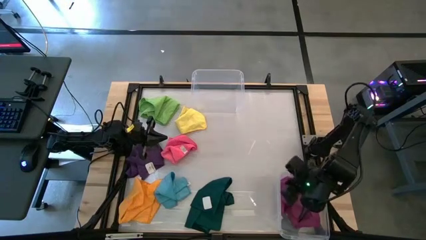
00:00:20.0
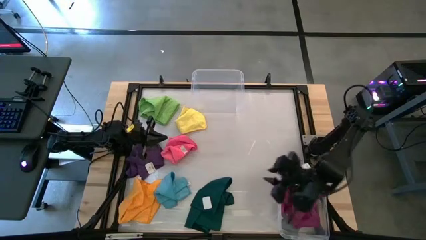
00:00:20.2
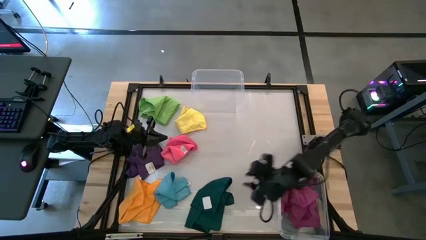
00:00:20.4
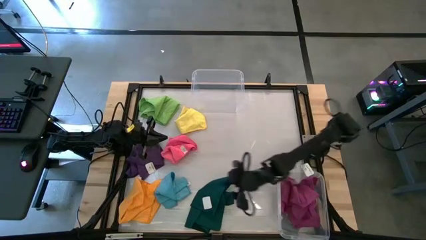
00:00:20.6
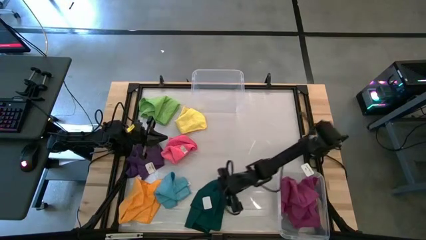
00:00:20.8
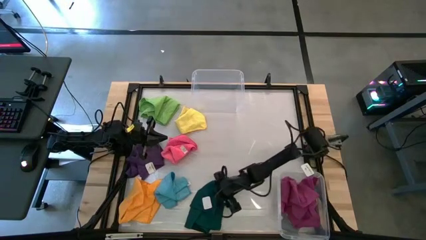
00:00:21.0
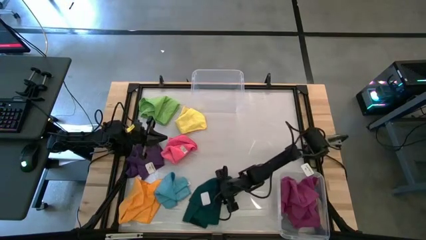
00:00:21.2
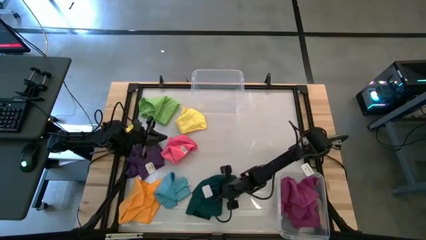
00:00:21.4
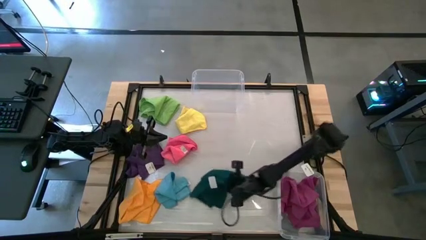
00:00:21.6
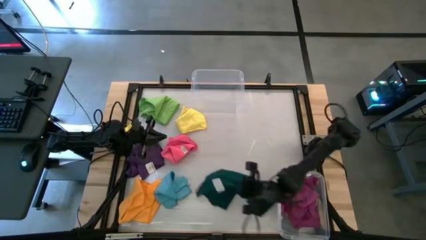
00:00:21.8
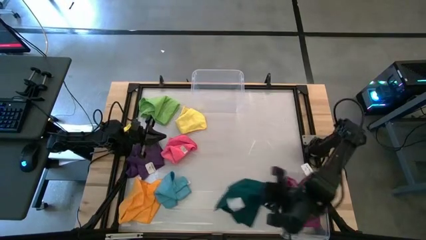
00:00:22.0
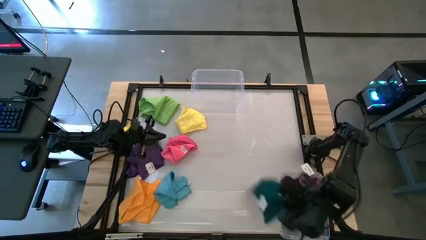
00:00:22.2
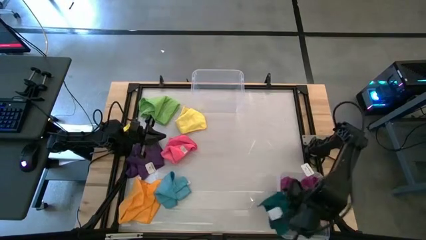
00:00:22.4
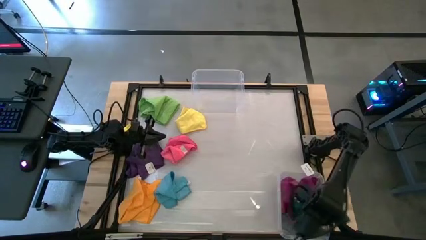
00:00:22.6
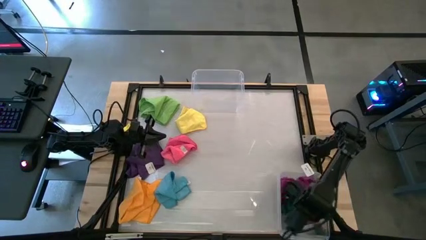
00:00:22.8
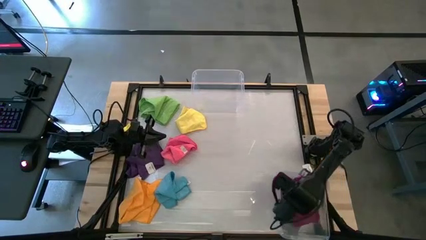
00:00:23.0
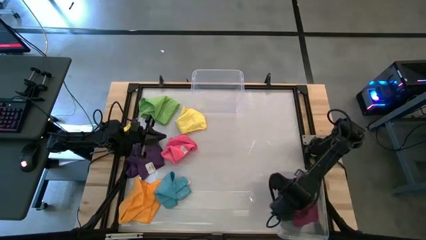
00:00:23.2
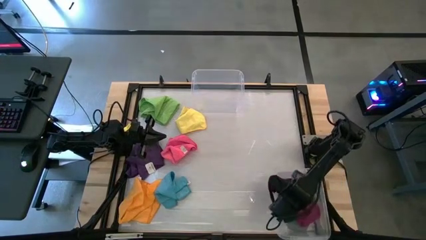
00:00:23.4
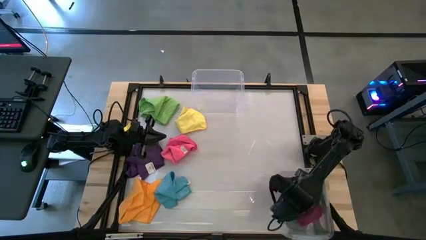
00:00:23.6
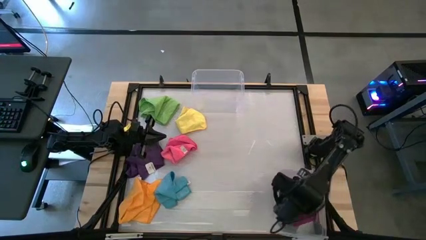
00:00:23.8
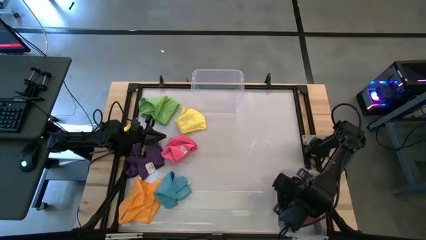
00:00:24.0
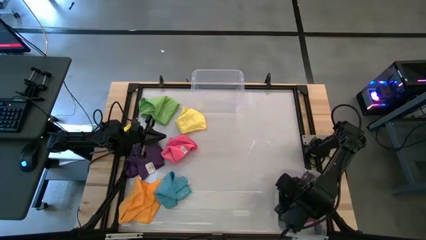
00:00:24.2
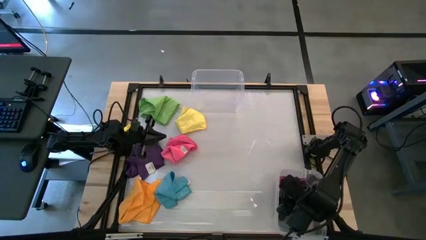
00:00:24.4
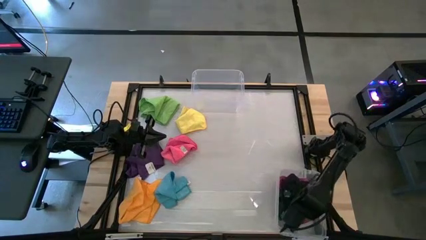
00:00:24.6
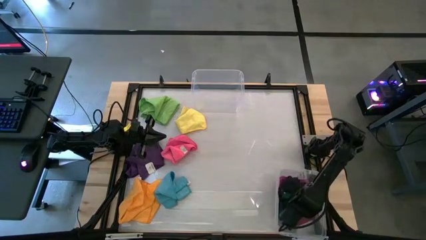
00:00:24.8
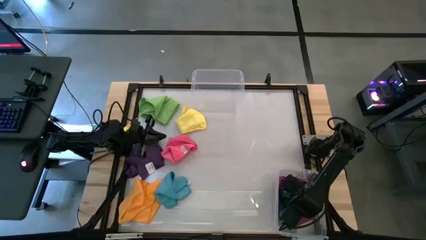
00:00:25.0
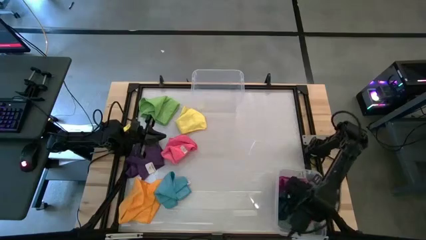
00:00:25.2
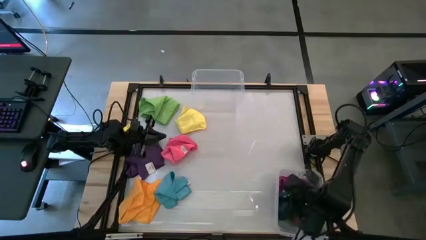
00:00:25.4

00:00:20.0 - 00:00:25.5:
Task: Sort towels by color in basket
Put the green microfiber cloth into the bottom transparent bin

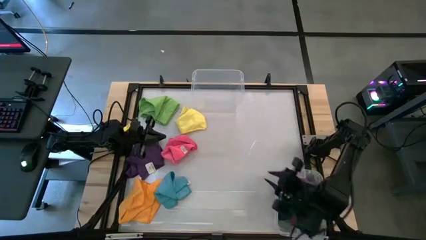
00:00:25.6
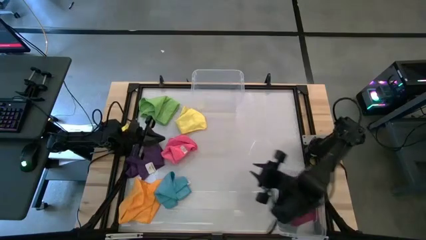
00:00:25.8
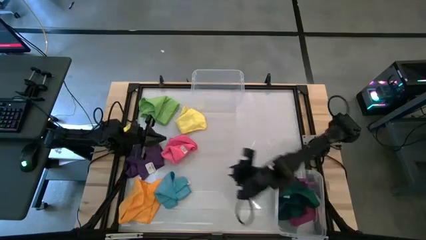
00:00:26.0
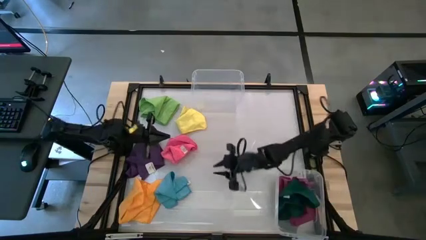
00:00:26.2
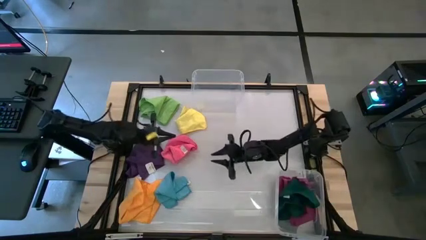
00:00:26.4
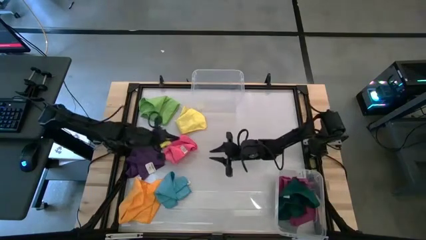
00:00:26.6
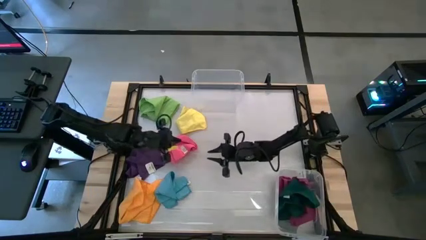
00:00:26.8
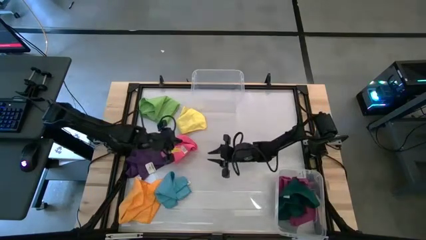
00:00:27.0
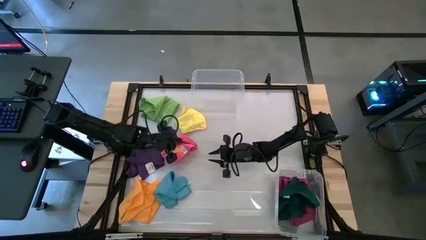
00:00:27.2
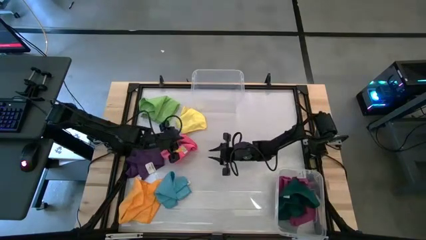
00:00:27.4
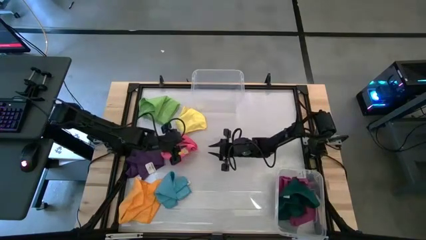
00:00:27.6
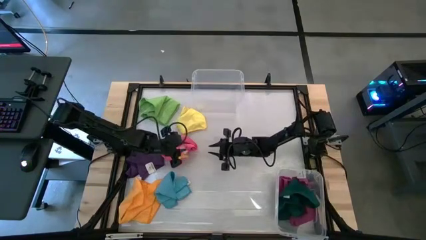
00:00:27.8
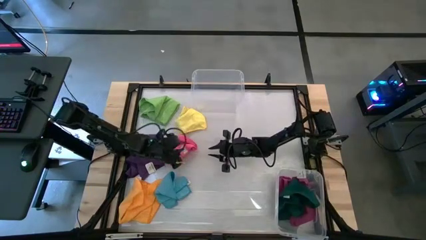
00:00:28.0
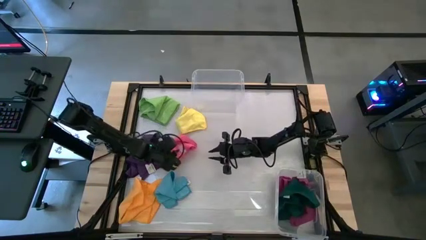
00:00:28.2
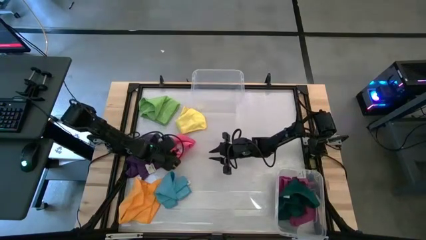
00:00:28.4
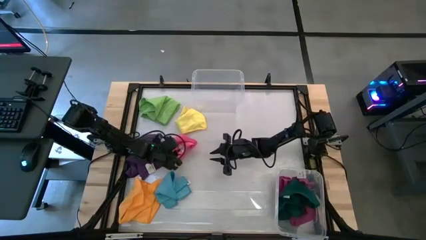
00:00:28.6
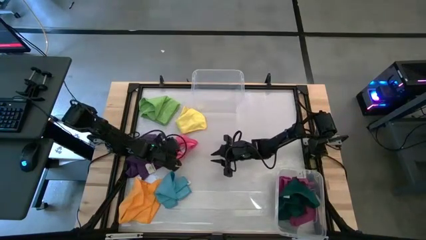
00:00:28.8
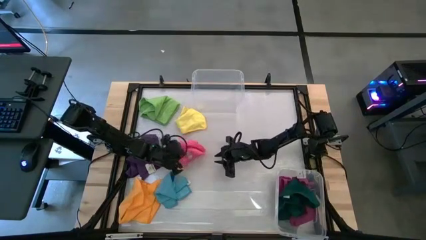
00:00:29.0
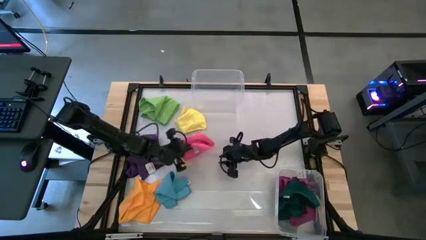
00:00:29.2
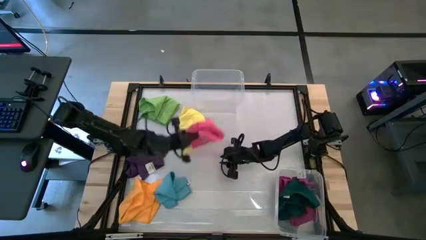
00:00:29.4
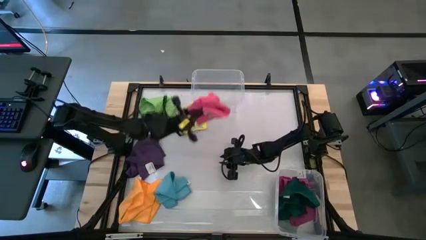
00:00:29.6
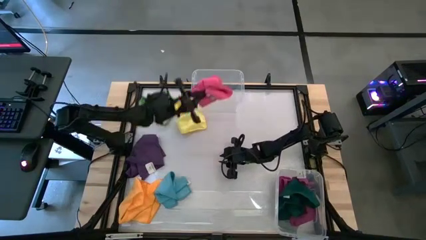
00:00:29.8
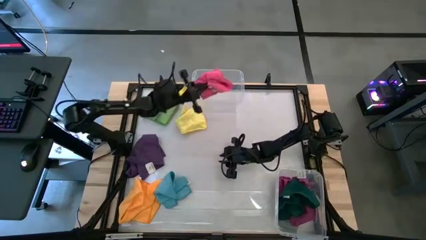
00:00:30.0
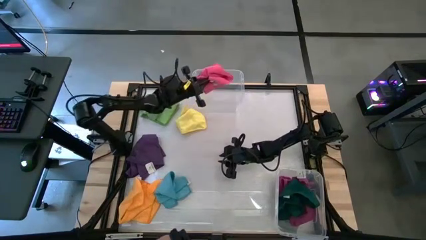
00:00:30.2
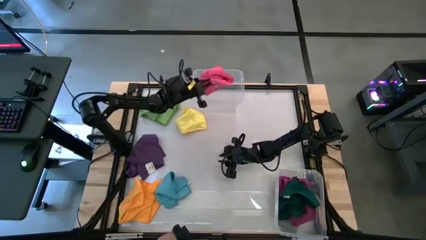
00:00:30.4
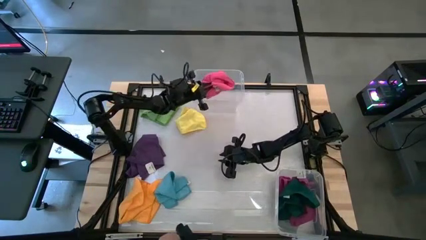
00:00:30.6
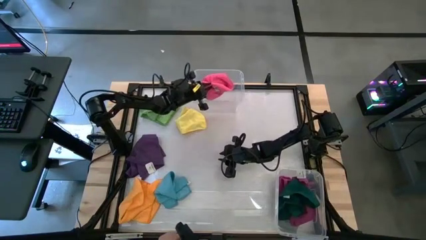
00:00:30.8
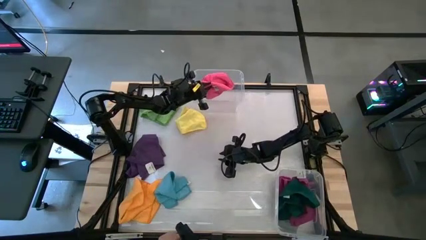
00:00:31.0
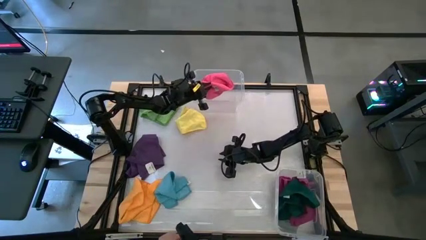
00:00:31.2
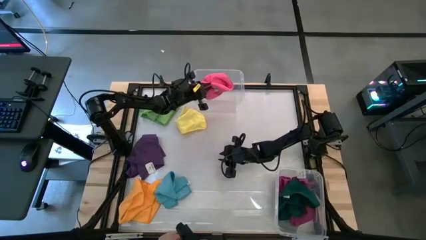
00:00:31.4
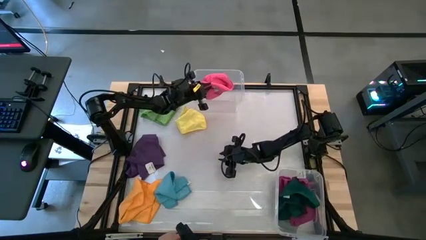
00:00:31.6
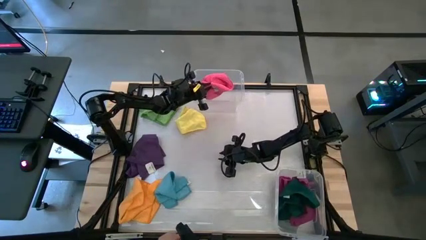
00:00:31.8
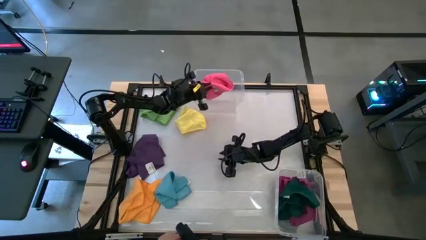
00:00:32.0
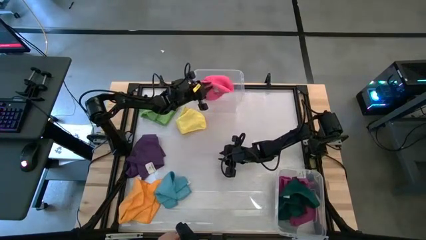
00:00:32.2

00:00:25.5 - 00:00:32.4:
Put the pink microfiber cloth into the top transparent bin
